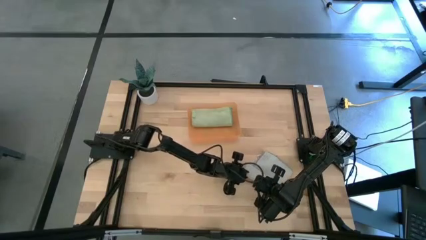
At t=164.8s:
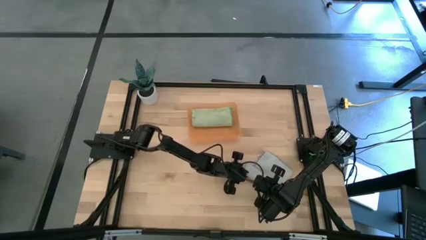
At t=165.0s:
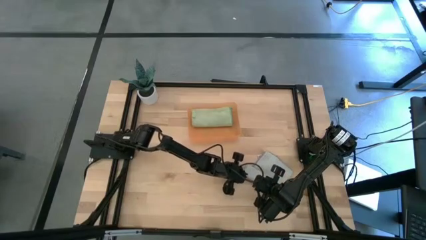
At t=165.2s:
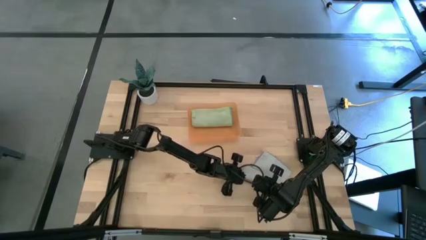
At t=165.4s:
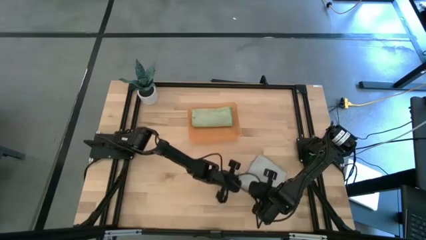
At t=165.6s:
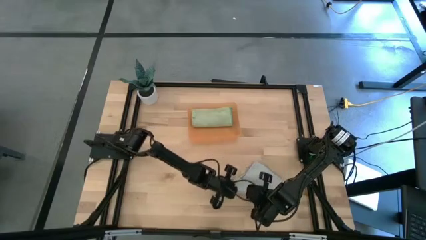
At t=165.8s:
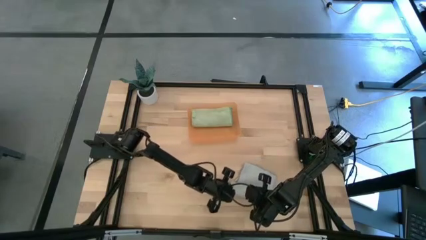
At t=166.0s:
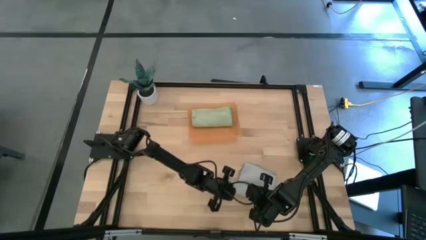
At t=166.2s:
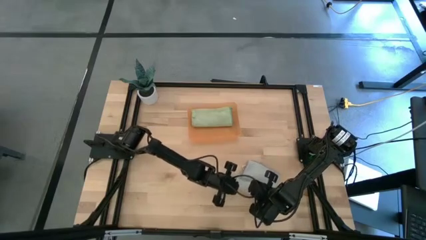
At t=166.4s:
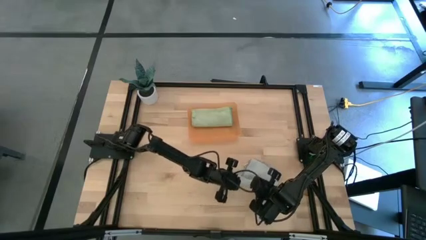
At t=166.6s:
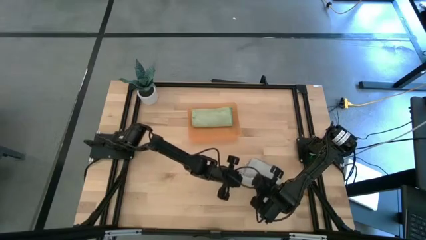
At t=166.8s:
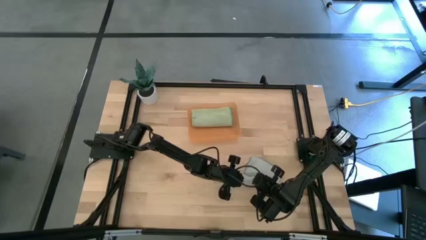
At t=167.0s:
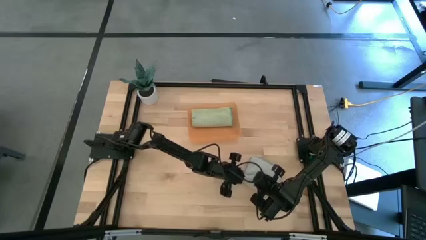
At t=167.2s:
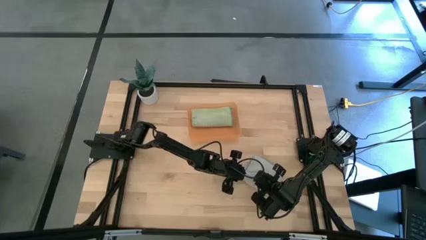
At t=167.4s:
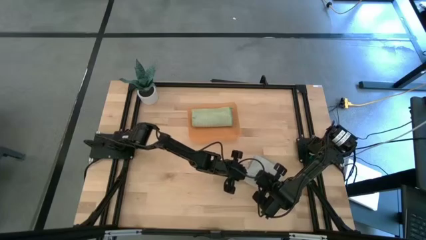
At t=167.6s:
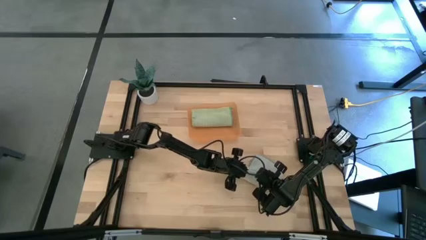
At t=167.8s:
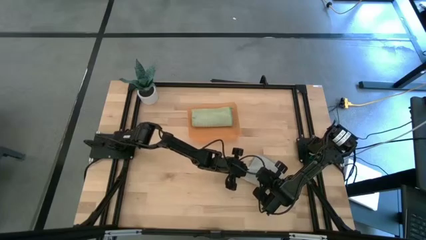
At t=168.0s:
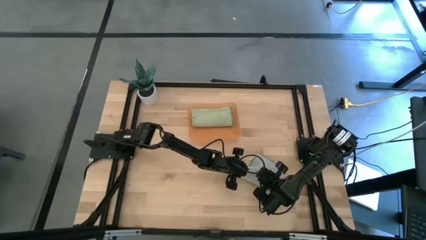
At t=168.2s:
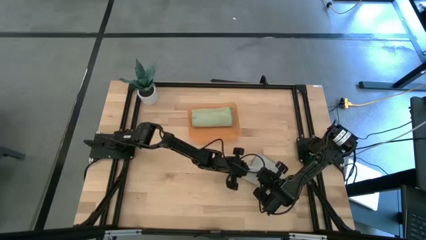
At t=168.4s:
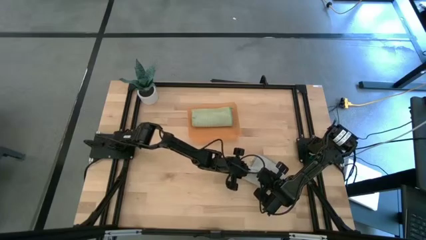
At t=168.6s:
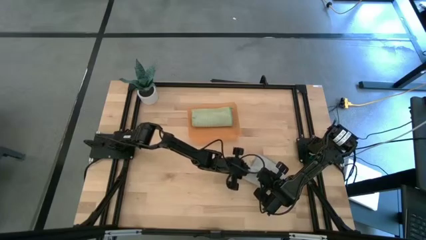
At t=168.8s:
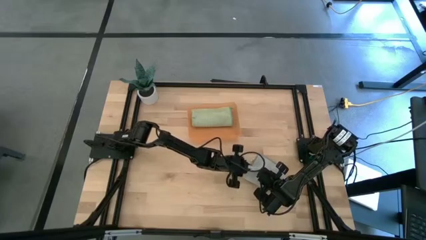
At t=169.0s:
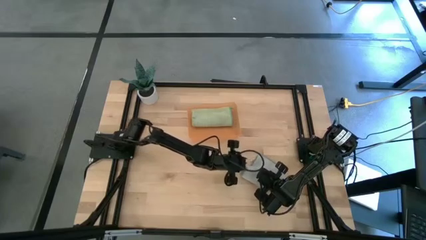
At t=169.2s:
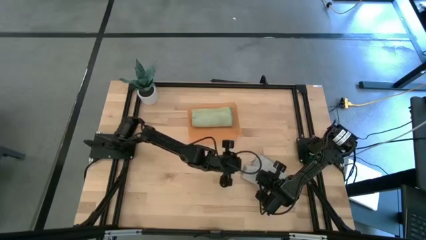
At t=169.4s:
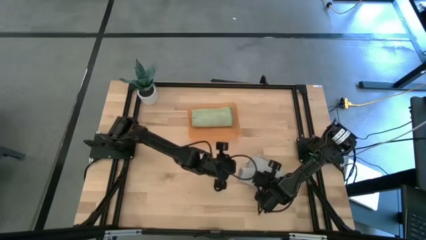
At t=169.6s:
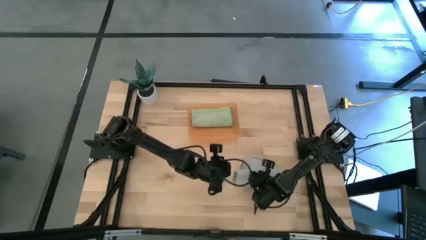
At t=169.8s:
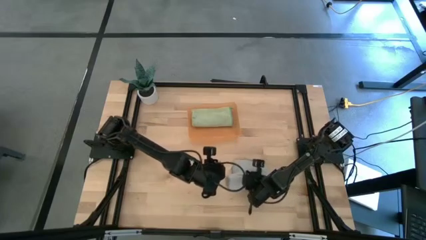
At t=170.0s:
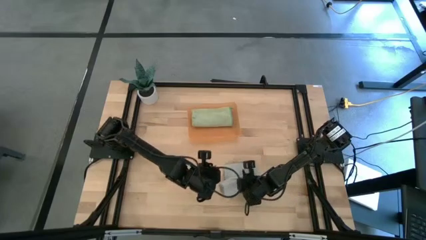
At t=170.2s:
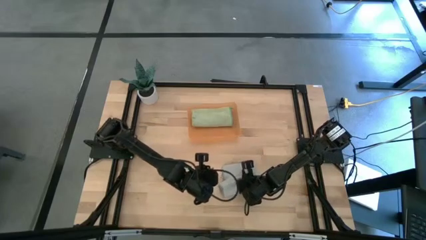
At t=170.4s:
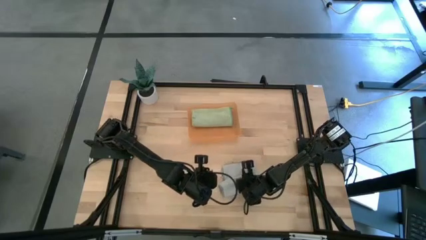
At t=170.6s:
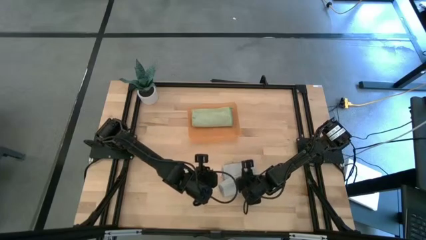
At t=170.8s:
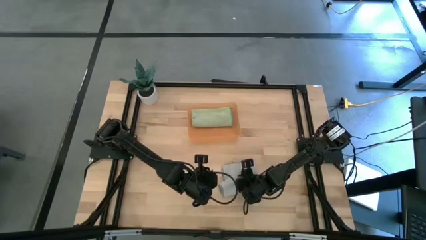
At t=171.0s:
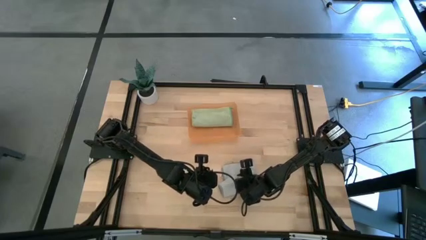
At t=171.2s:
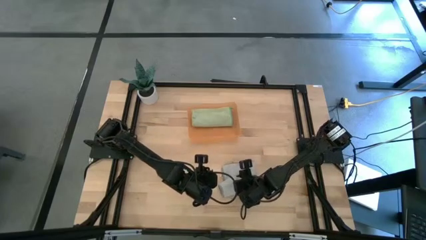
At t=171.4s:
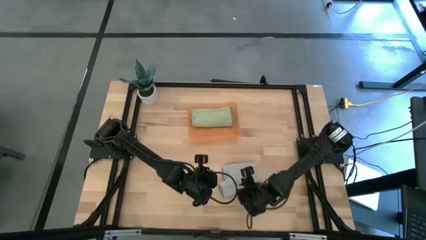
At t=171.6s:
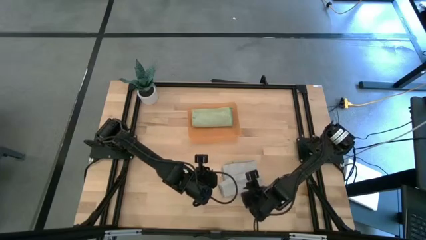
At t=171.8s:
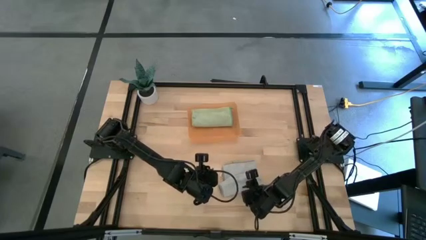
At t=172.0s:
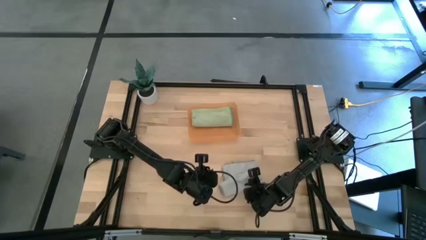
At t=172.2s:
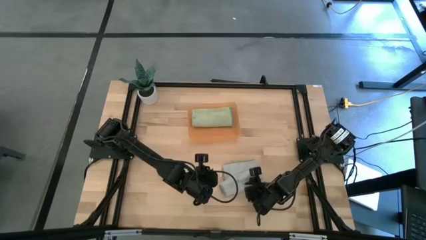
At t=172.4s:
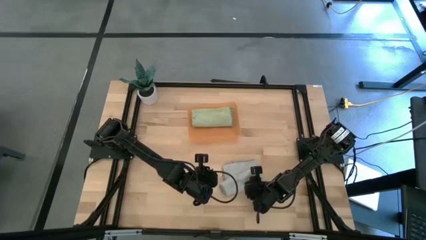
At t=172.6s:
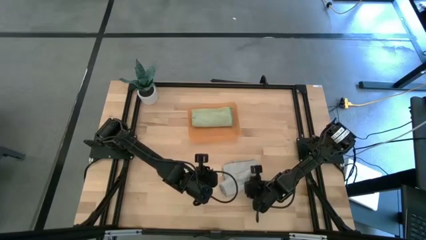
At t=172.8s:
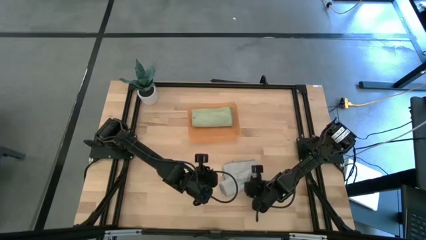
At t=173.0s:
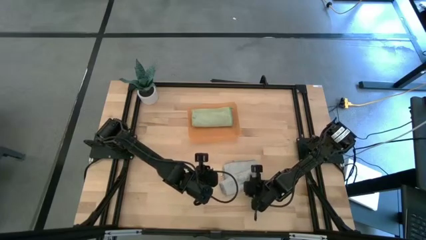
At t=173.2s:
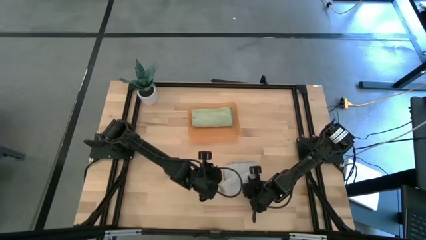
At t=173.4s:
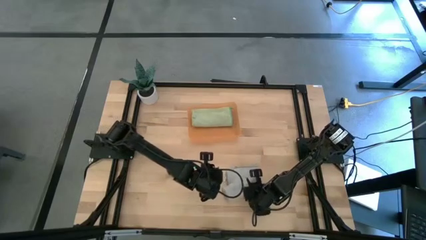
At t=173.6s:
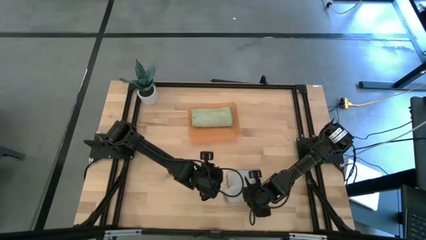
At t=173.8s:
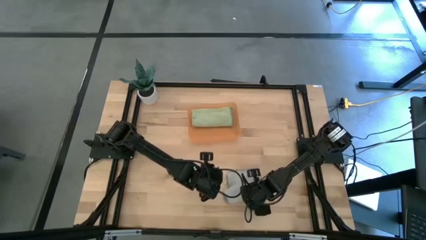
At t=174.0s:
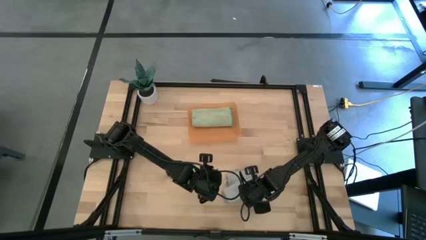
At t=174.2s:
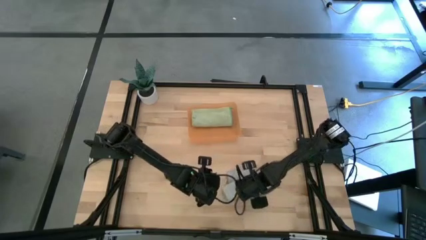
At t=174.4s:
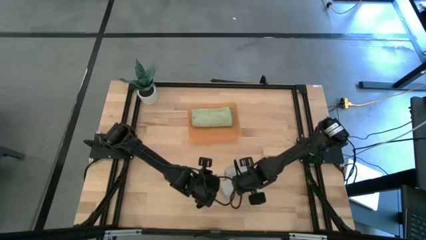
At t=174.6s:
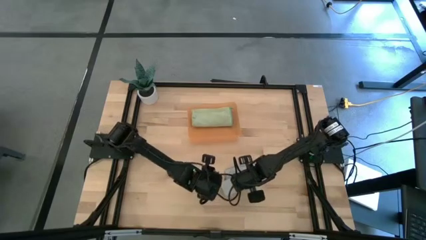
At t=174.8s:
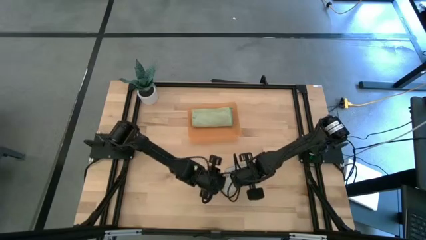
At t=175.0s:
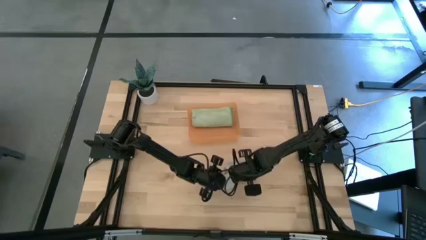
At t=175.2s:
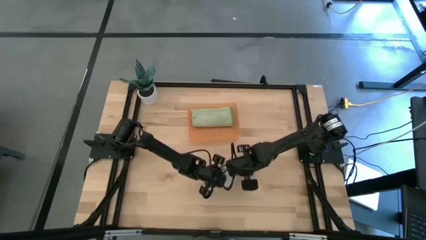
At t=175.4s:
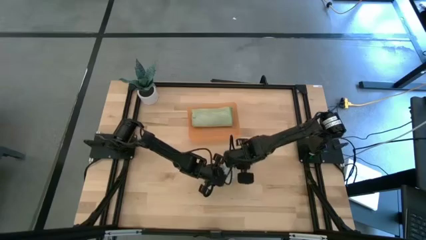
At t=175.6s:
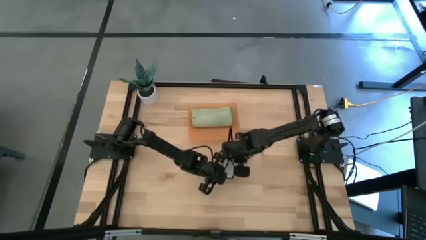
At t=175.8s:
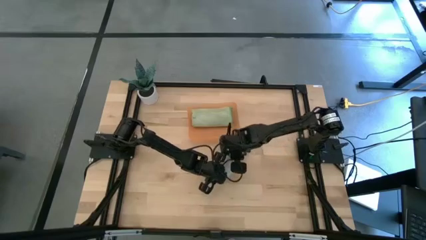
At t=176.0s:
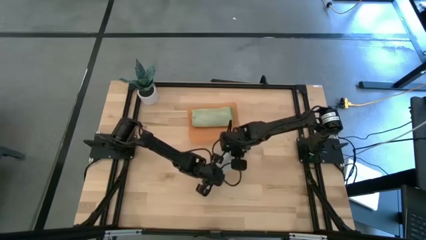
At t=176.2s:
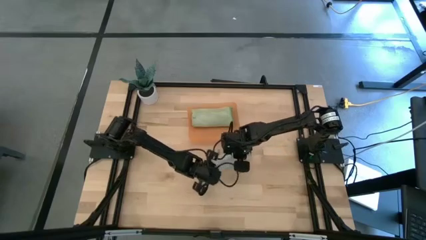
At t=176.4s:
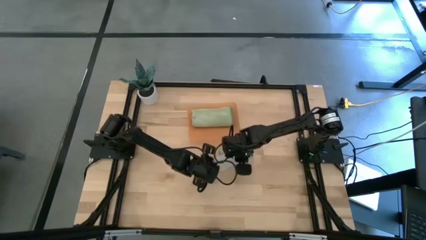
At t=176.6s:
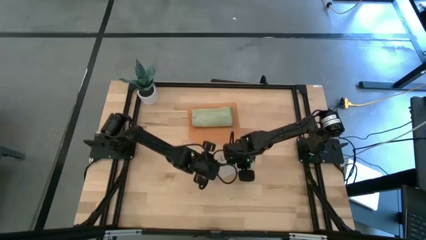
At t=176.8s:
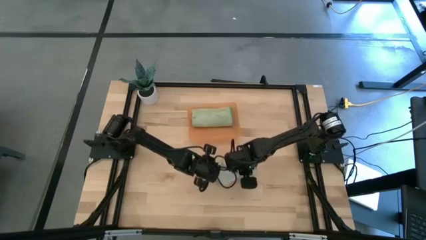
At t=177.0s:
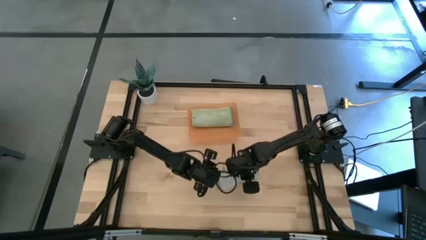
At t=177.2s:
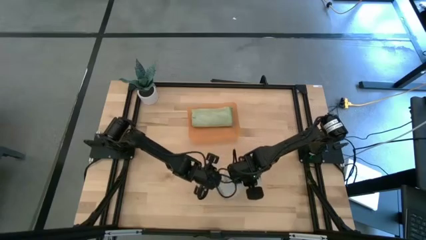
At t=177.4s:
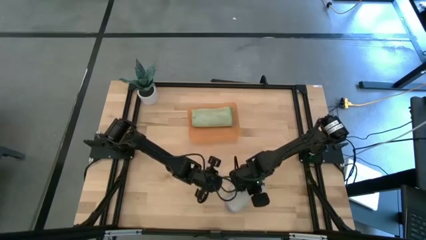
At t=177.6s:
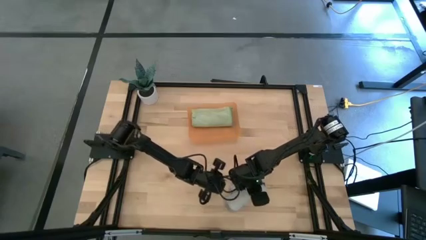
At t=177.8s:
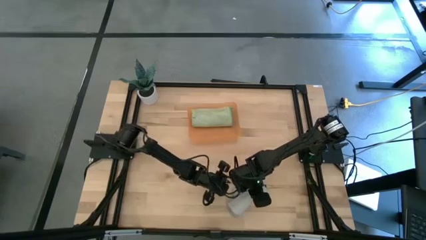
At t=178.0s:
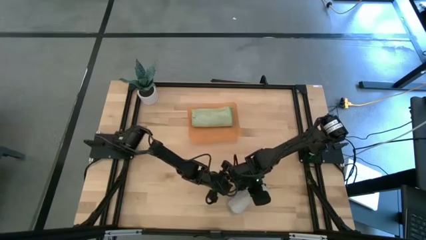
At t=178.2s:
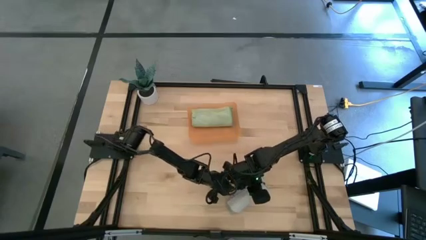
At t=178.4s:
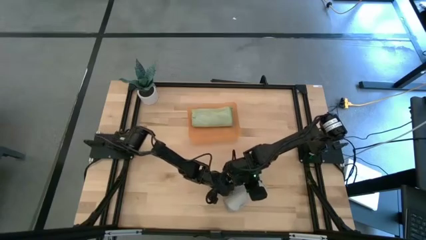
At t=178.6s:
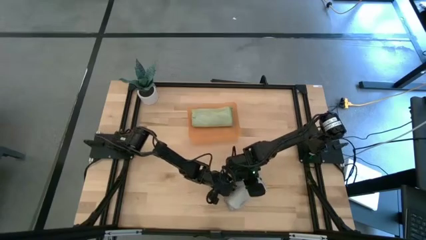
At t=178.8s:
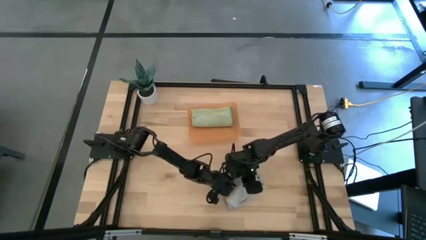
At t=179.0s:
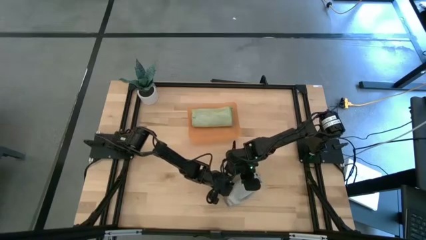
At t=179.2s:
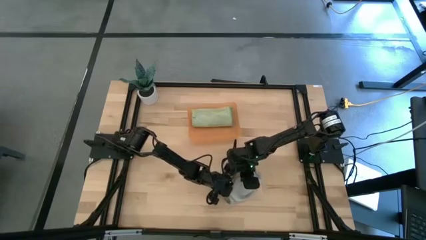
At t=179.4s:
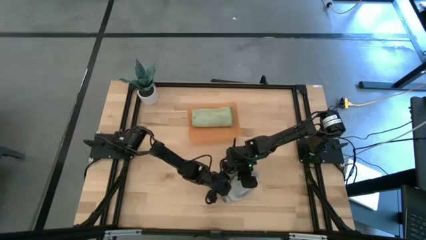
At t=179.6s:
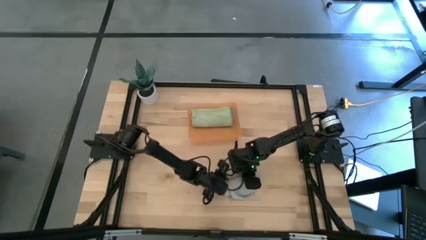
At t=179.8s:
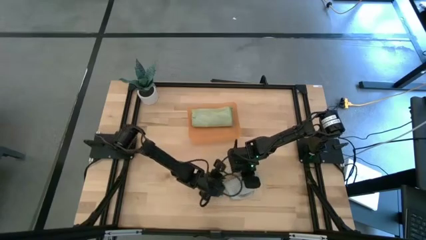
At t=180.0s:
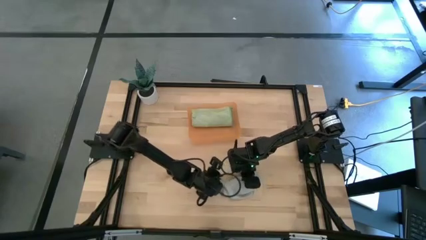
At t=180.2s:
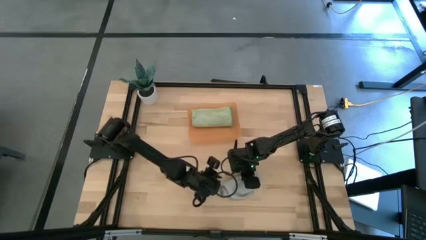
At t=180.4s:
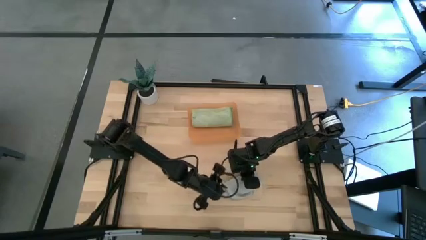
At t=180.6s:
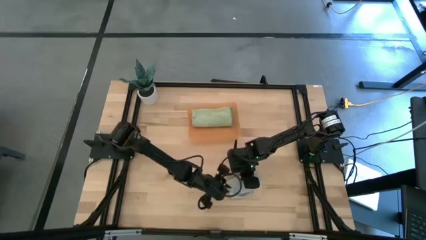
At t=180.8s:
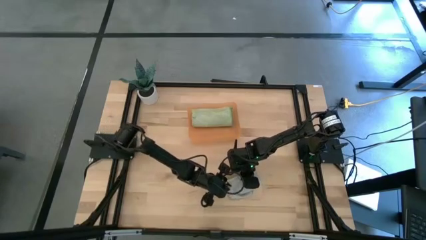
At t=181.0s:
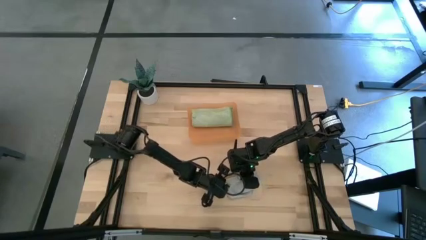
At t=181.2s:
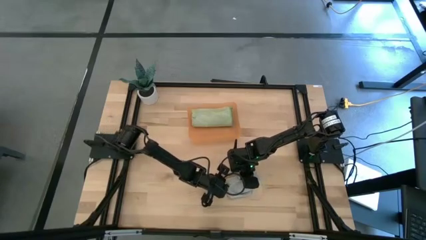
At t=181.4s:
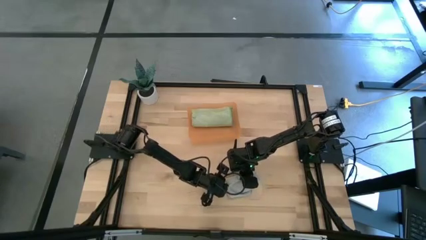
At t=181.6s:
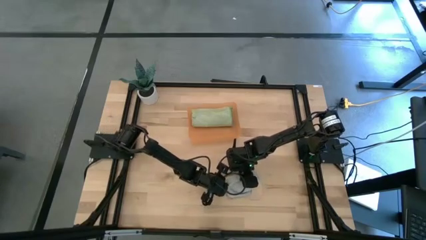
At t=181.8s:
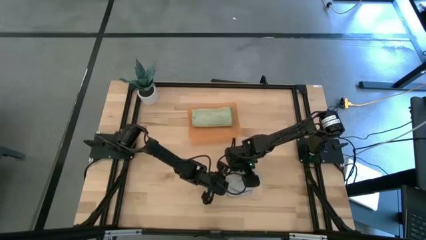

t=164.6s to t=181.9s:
Task: Roll microfiber towels into tight, uniform cylinder then place into a basket
Roll the gray microfiber towel
